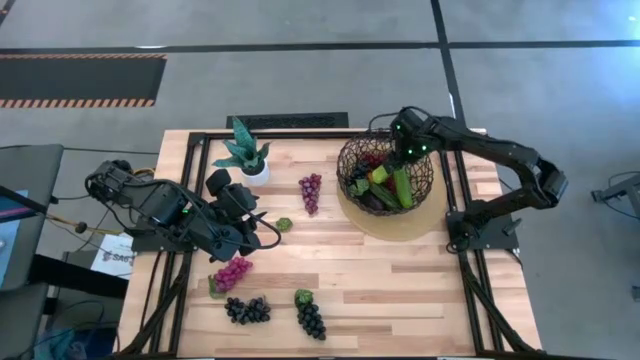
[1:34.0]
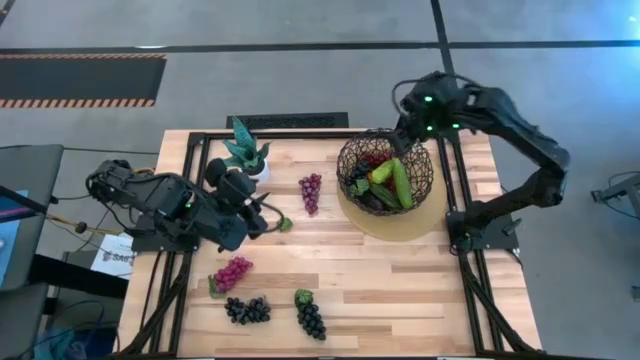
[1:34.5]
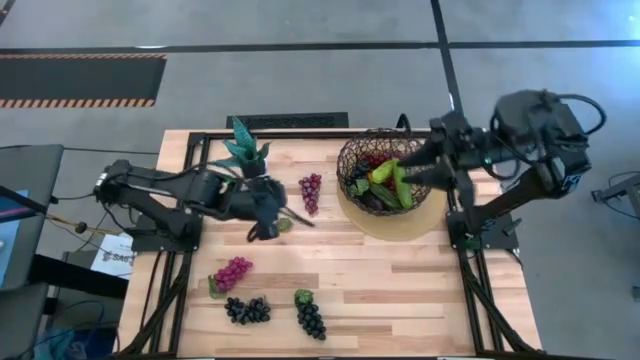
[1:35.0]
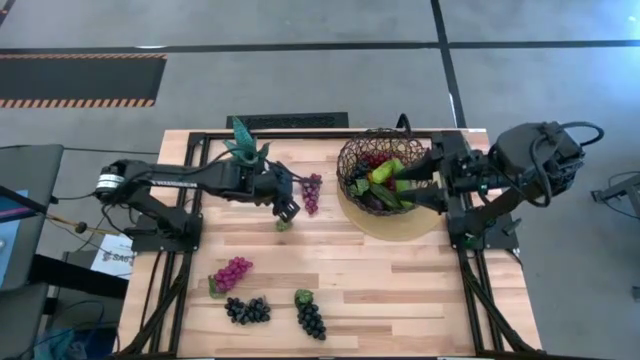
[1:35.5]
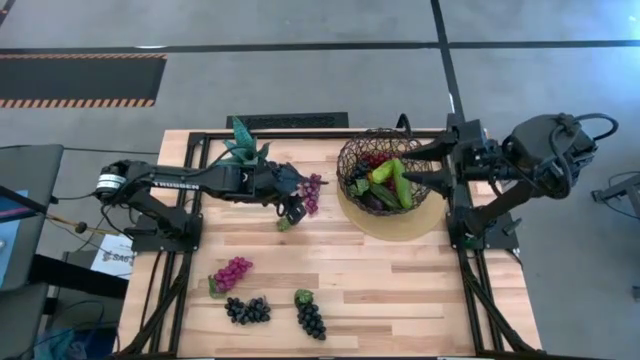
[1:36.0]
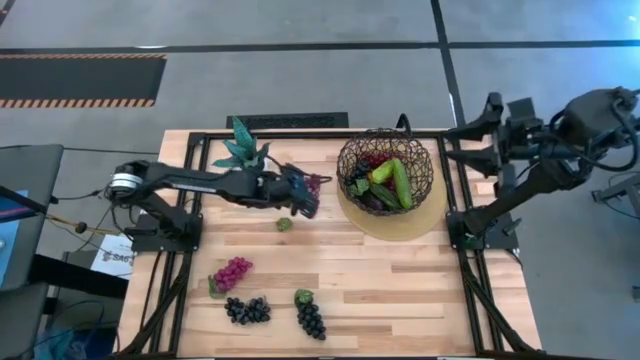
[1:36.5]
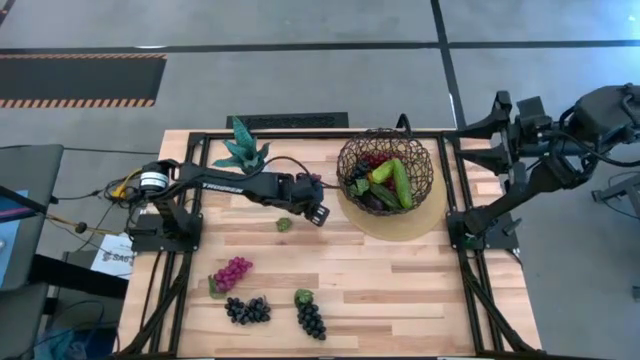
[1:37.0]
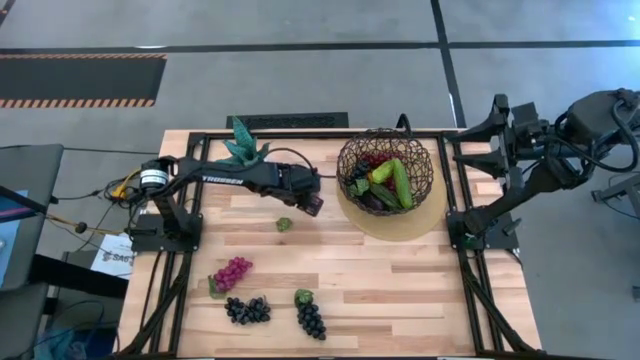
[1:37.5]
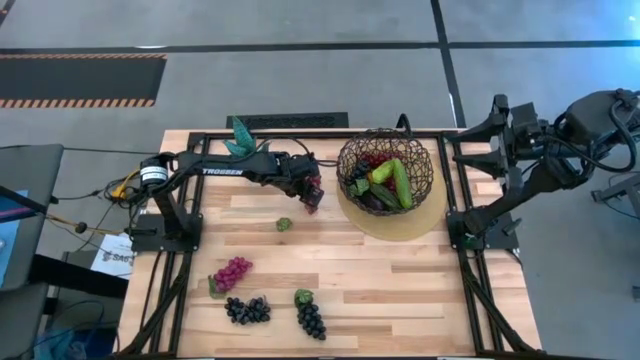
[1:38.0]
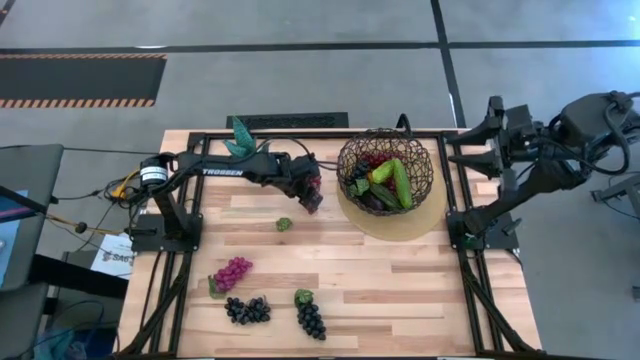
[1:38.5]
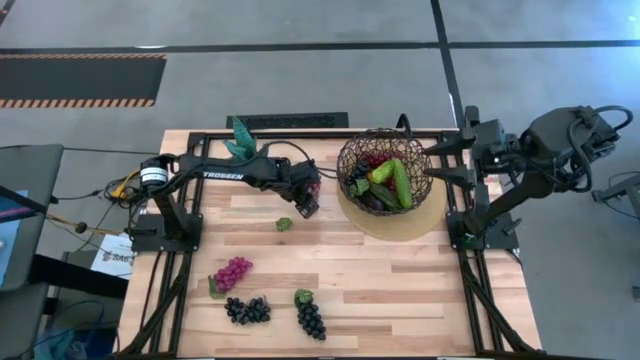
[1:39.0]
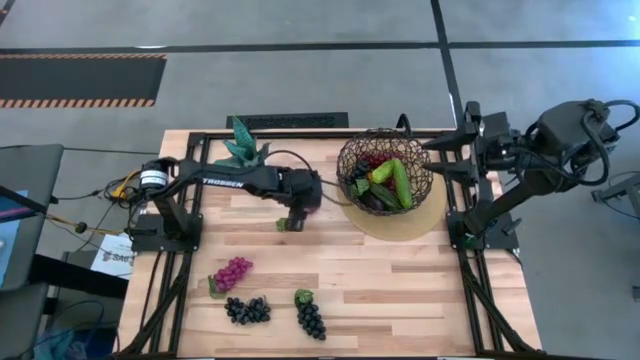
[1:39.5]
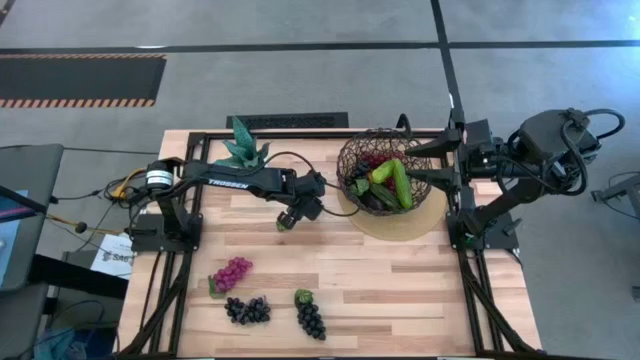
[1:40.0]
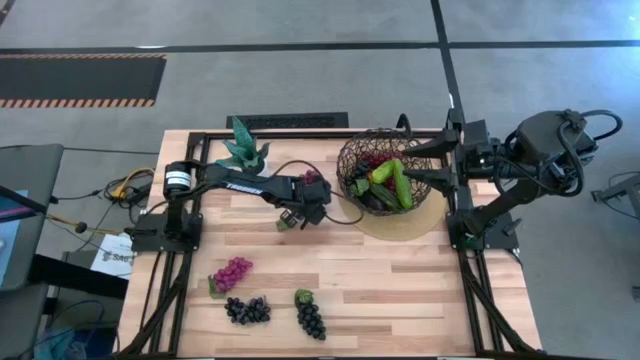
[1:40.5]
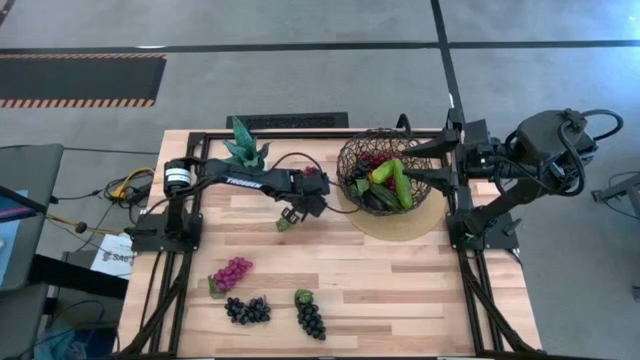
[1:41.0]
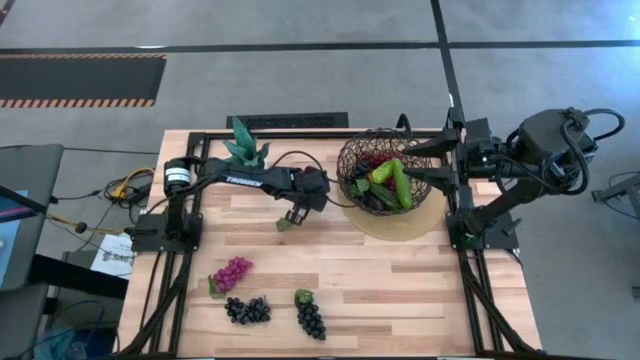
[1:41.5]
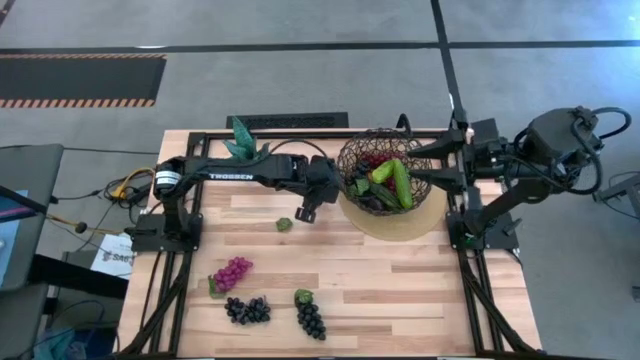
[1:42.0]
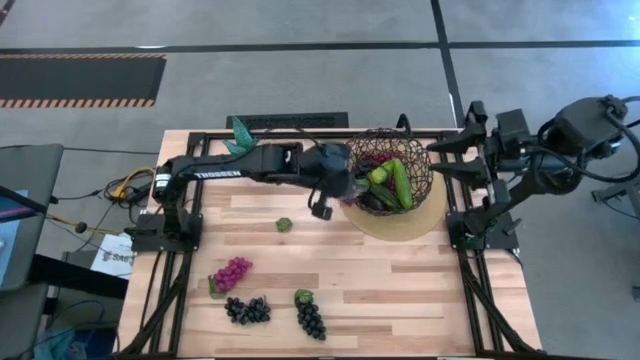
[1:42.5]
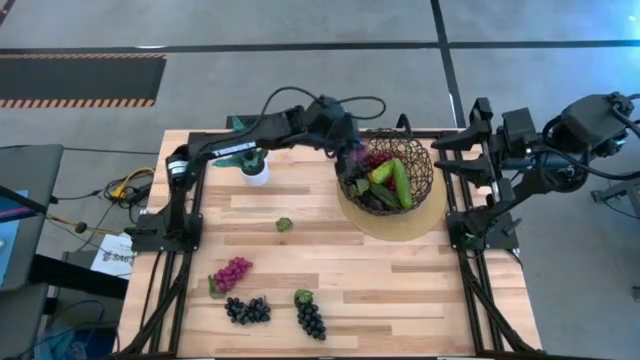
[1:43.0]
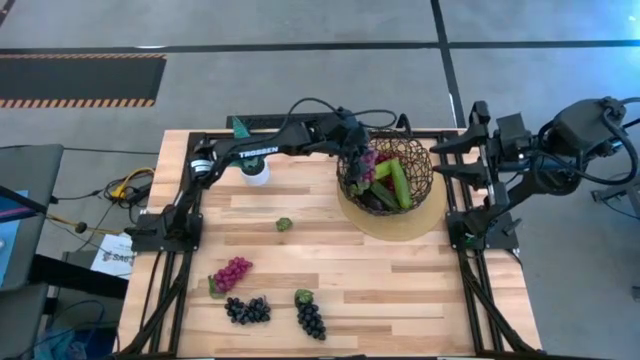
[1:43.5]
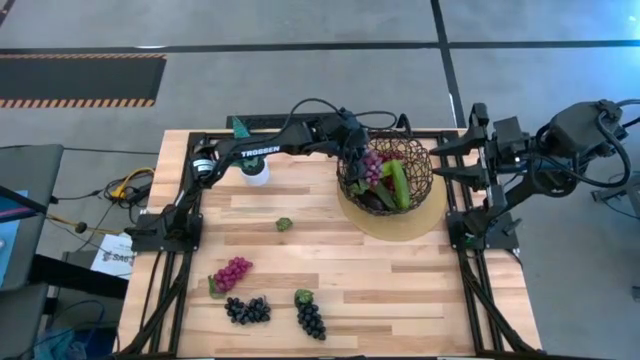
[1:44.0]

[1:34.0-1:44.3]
Task: Build produce basket
Put the purple grapes into the black wire basket

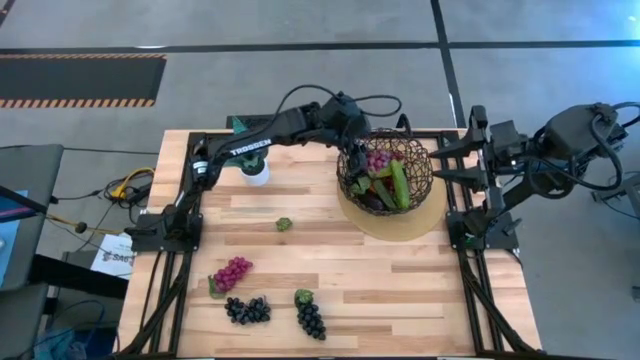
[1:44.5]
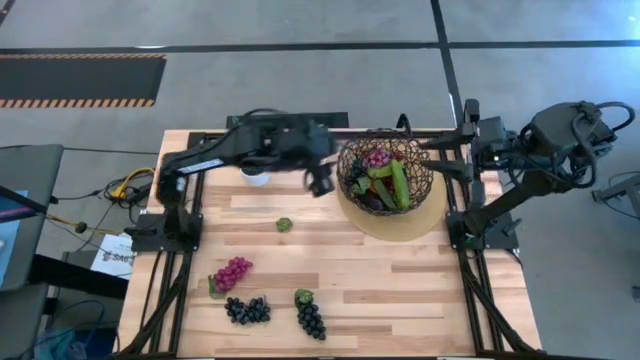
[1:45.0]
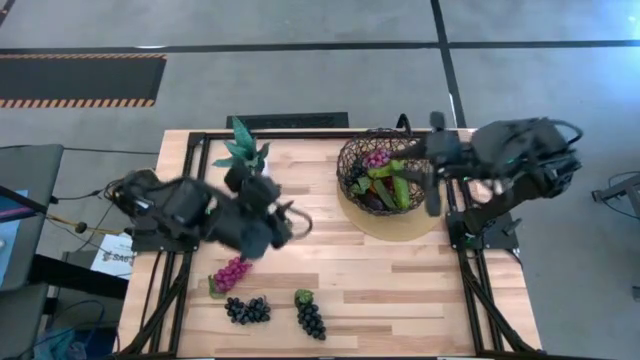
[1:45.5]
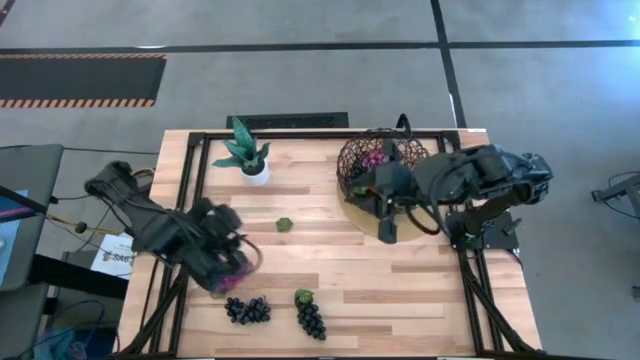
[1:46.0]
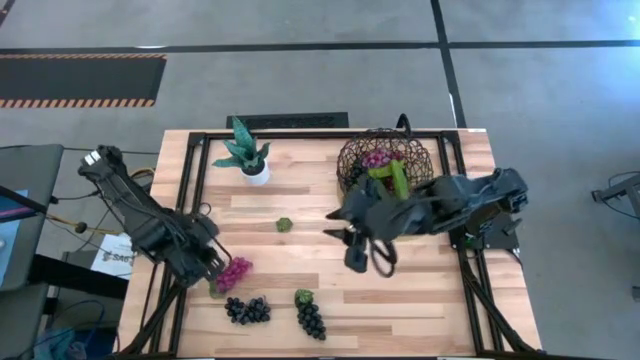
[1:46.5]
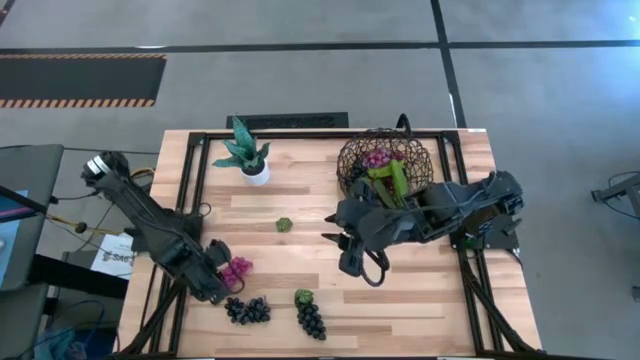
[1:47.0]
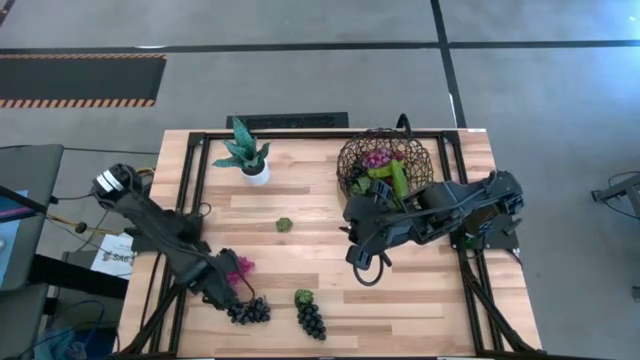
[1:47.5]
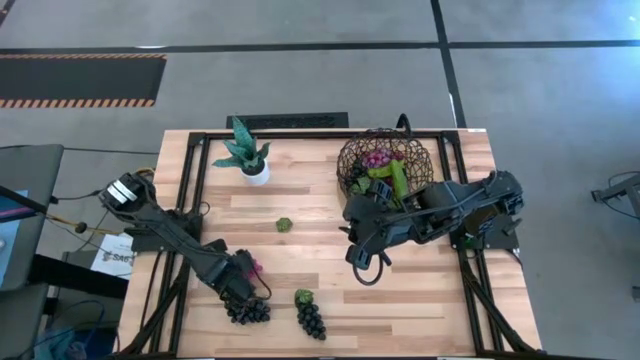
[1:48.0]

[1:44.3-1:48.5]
Put the purple grapes into the black wire basket

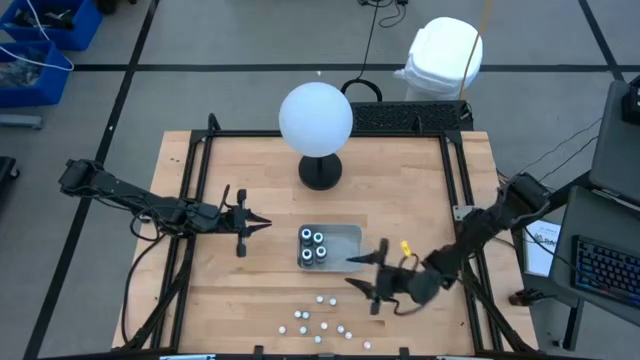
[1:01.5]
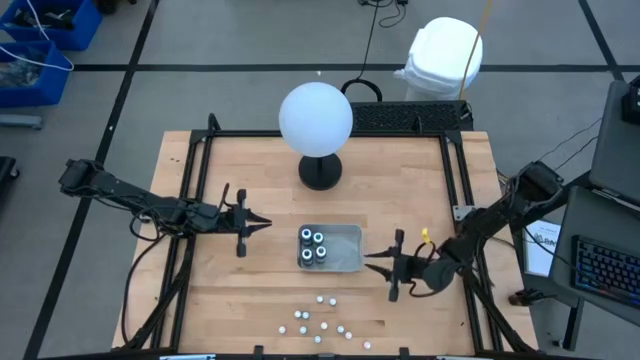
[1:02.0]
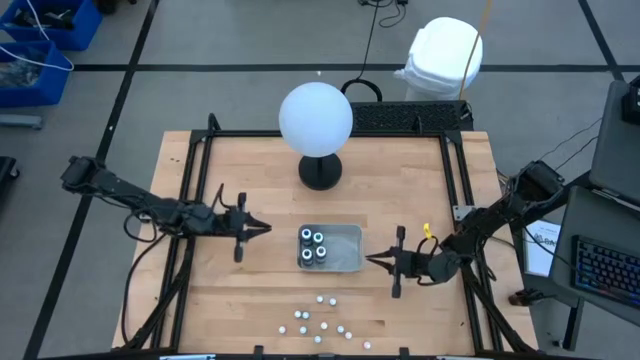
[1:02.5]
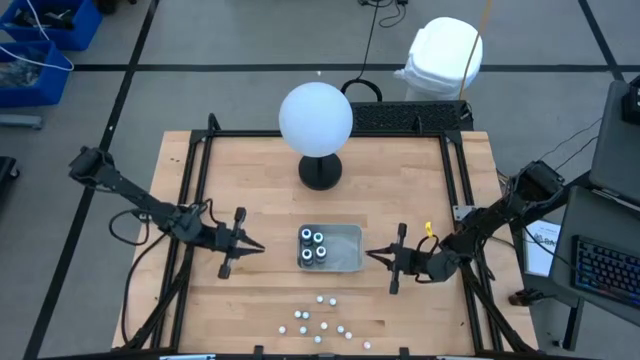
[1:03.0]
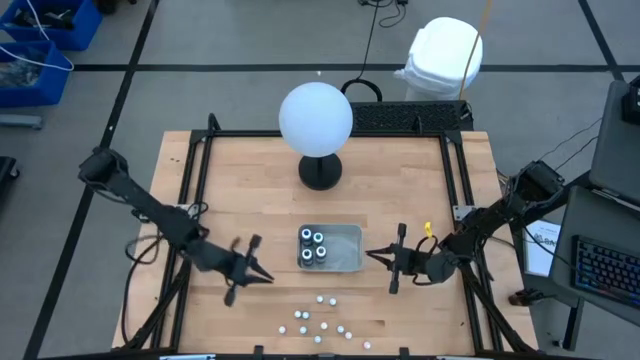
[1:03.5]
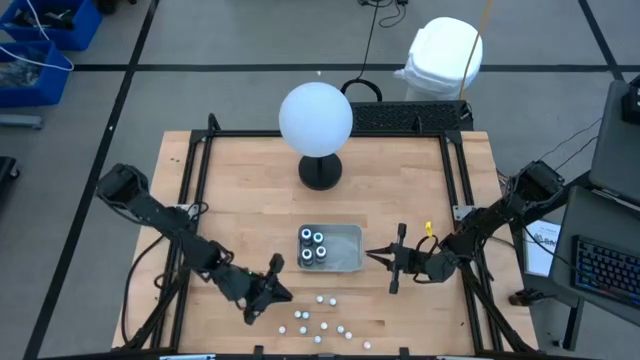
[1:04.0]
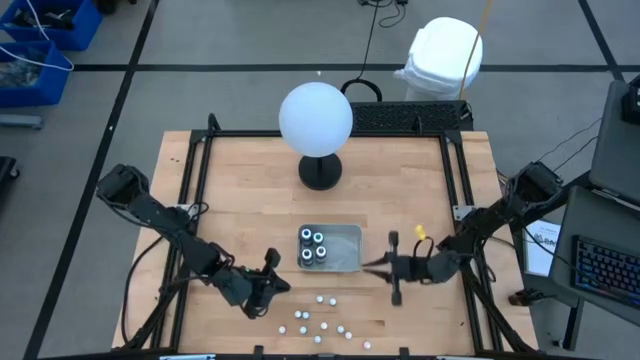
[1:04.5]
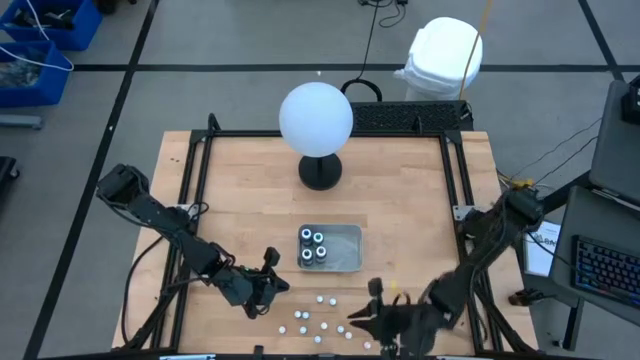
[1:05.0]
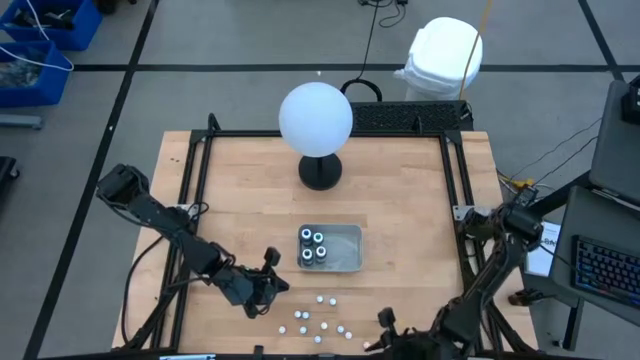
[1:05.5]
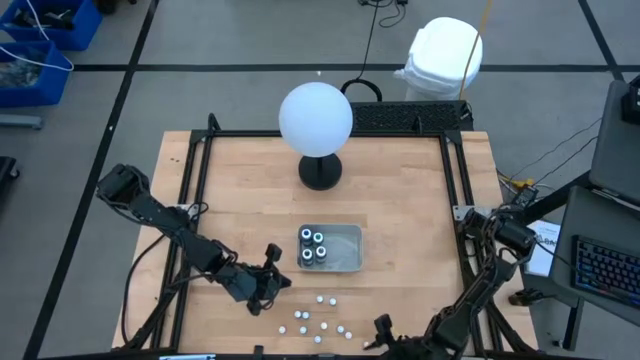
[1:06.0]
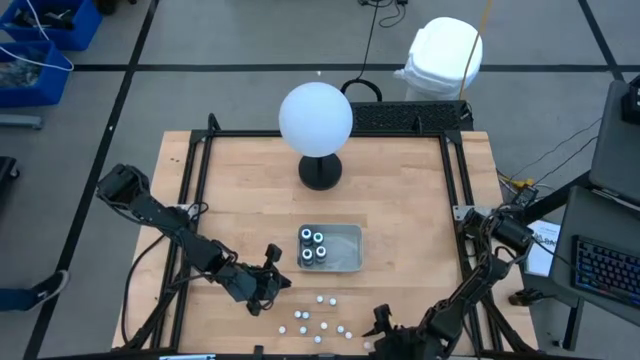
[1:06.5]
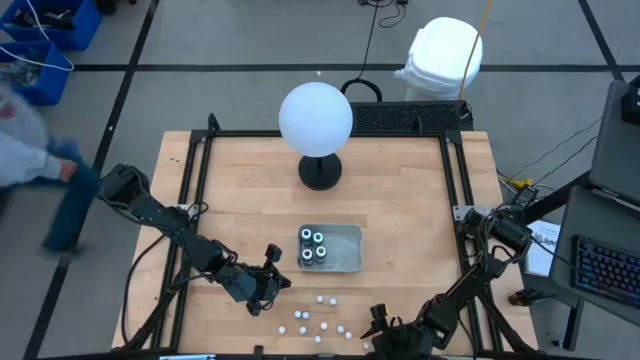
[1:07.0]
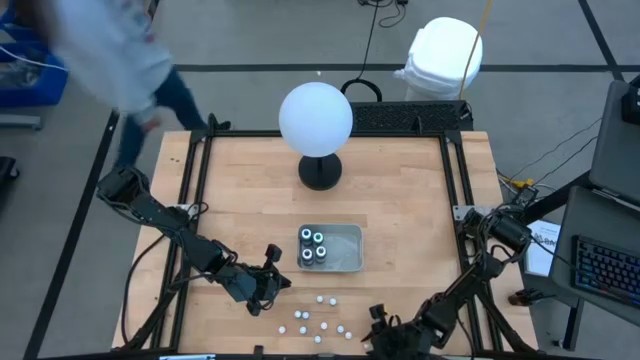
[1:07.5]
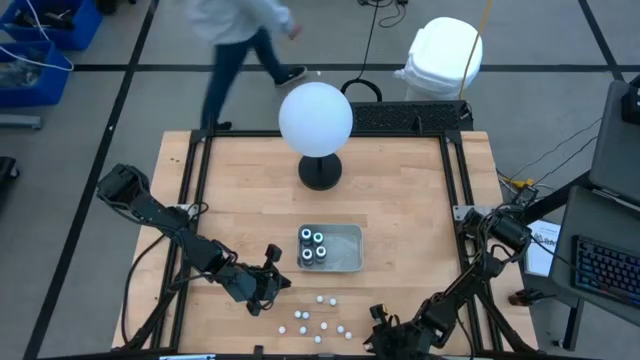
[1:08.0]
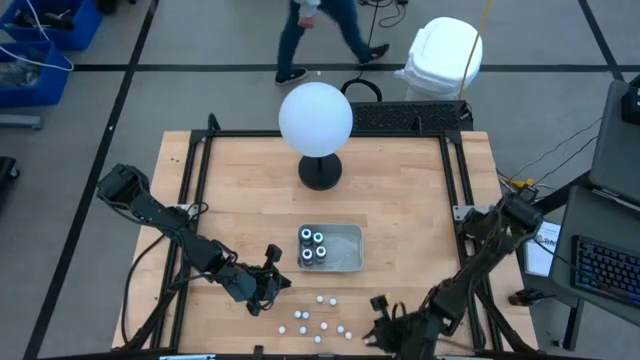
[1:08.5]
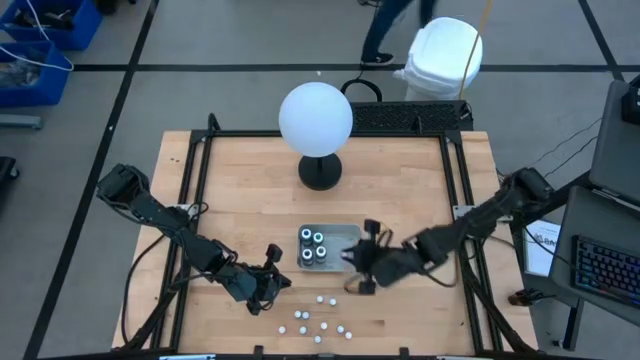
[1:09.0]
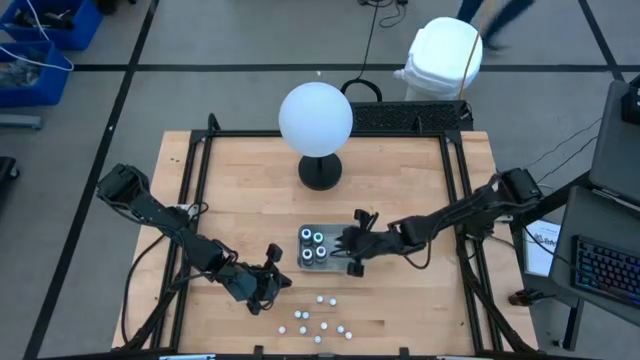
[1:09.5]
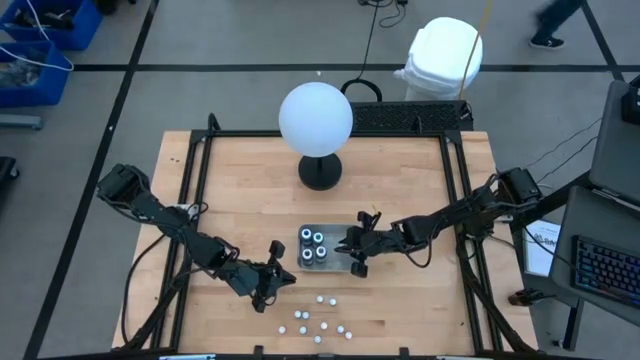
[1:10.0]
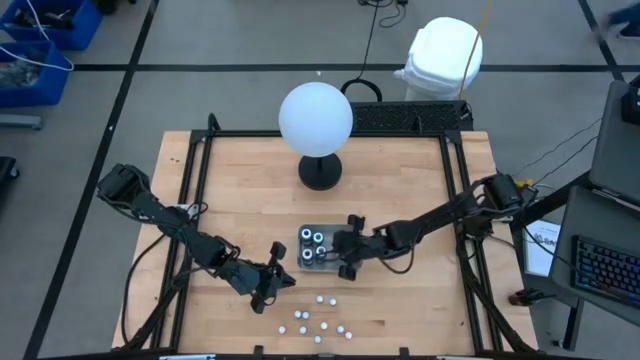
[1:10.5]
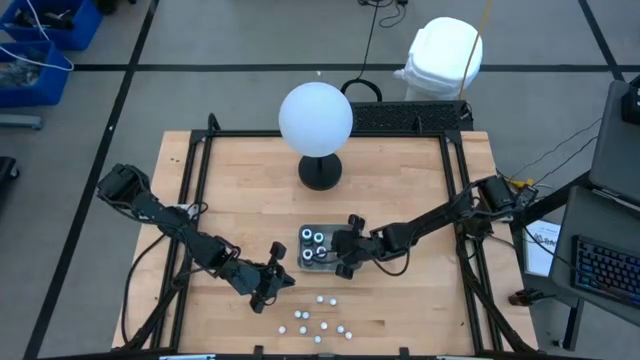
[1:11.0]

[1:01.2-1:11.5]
Task: Pick & Place food coloring
Put the small orange food coloring bottle into the gray bin
